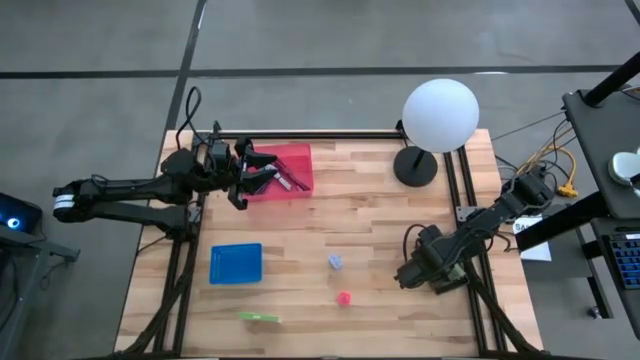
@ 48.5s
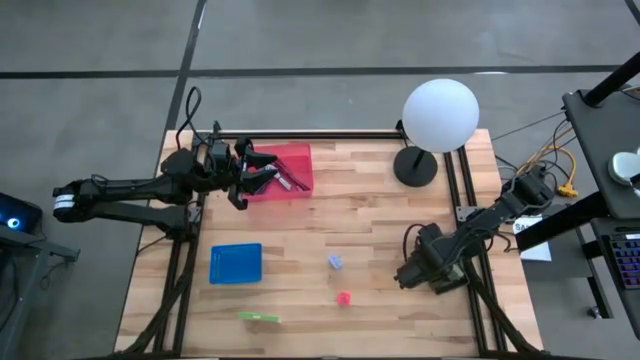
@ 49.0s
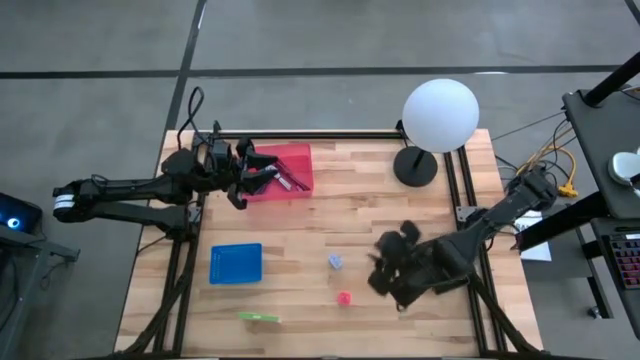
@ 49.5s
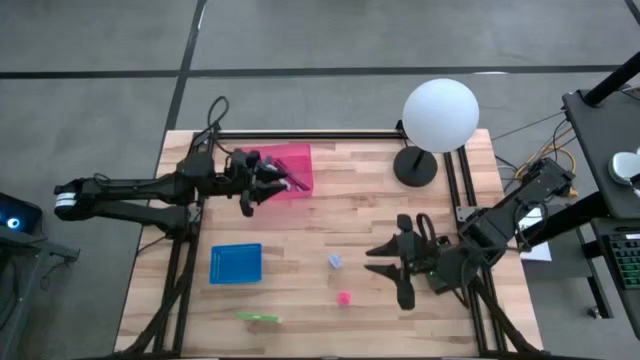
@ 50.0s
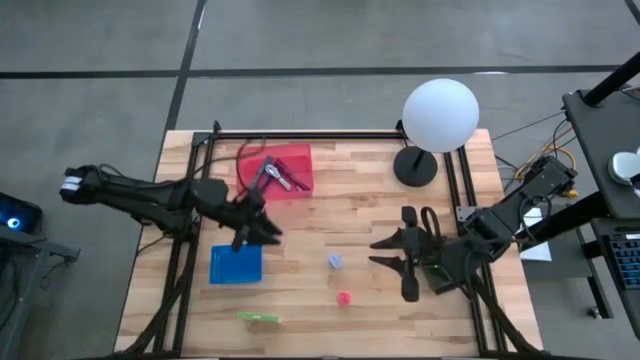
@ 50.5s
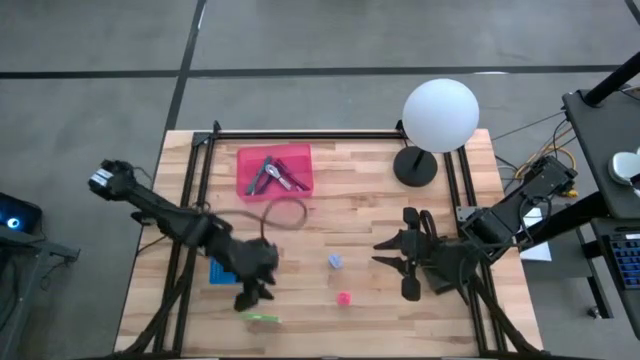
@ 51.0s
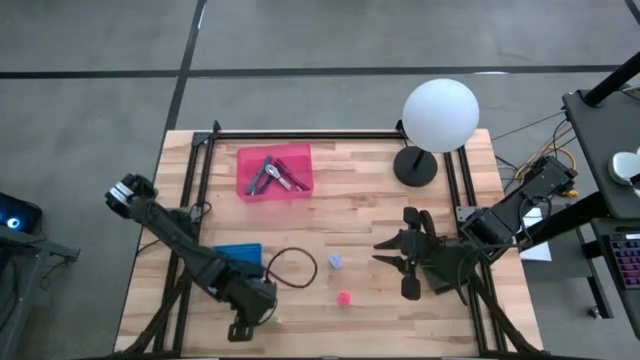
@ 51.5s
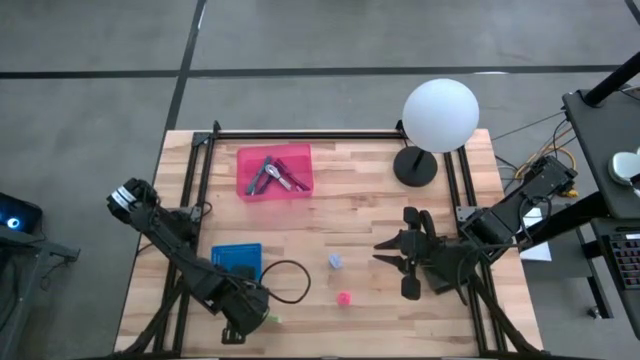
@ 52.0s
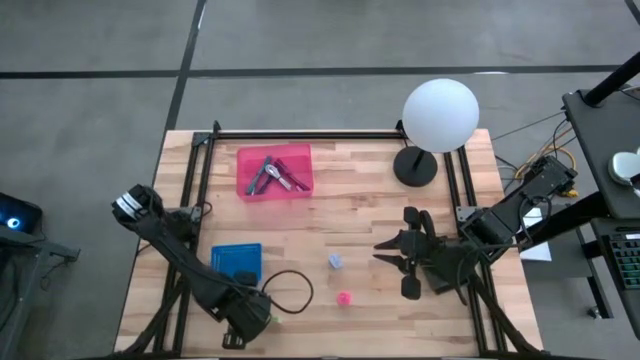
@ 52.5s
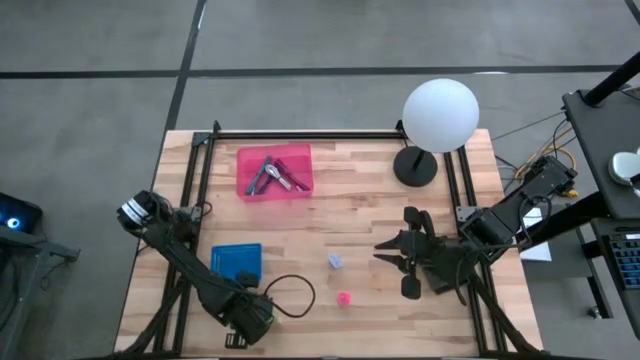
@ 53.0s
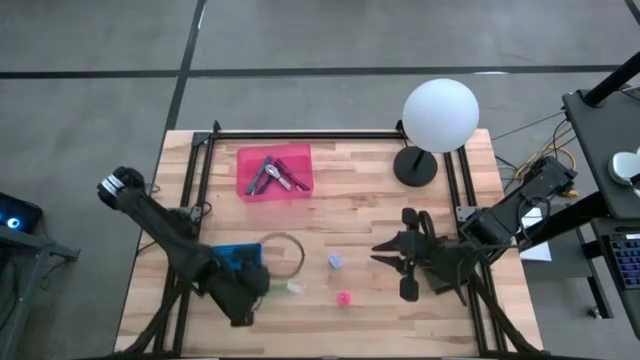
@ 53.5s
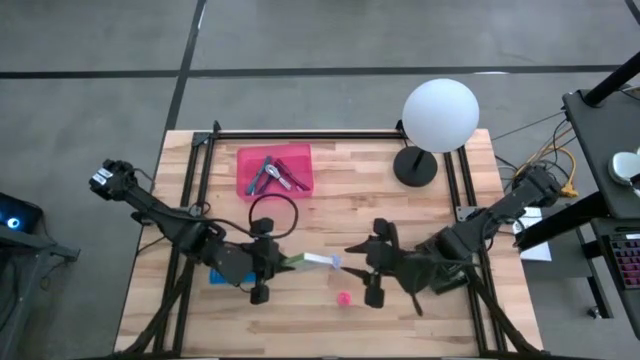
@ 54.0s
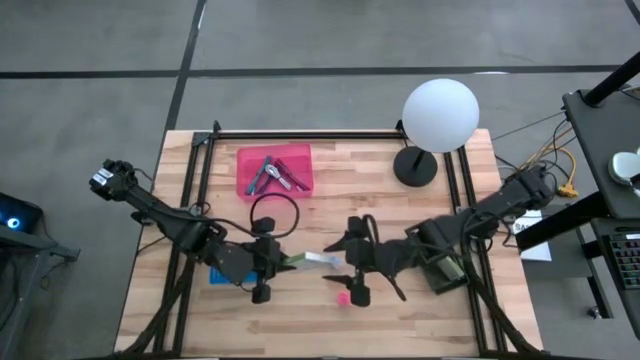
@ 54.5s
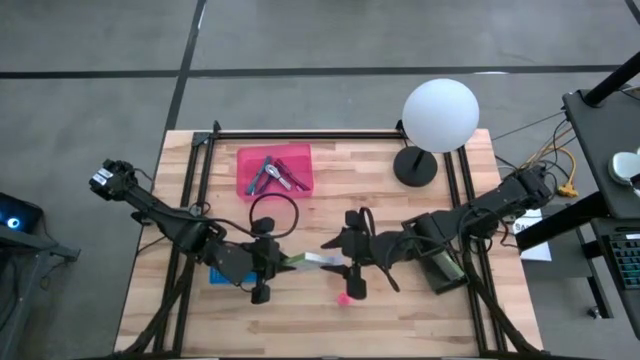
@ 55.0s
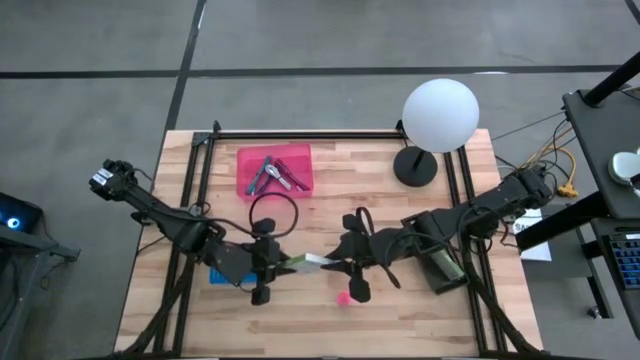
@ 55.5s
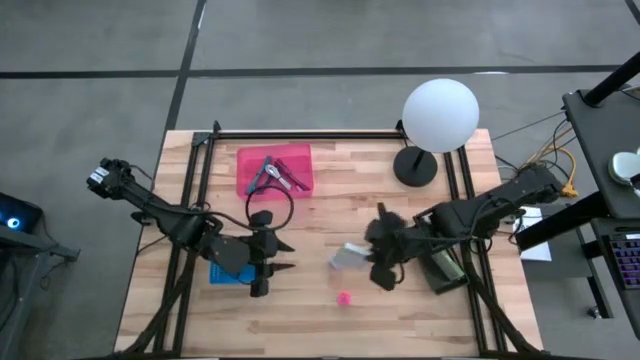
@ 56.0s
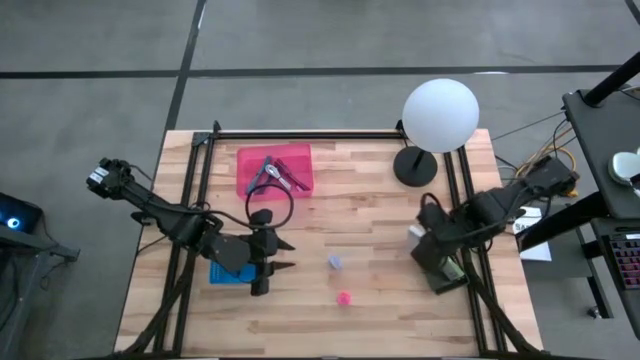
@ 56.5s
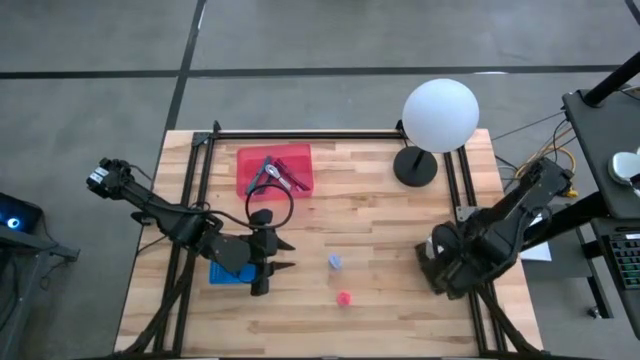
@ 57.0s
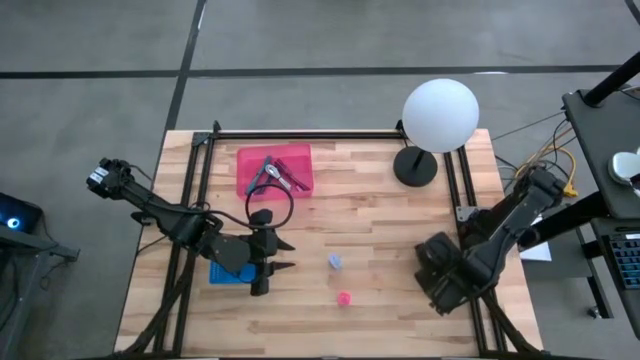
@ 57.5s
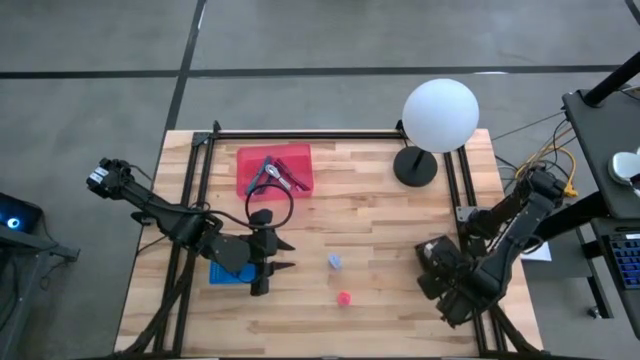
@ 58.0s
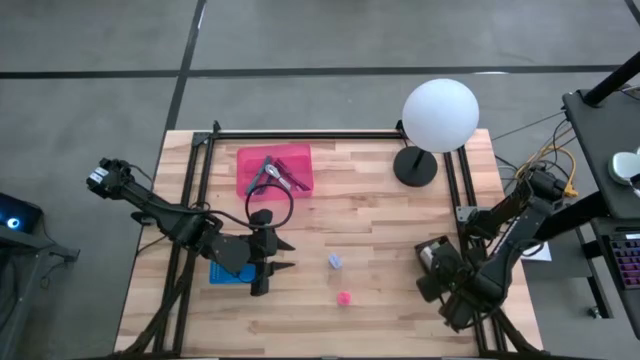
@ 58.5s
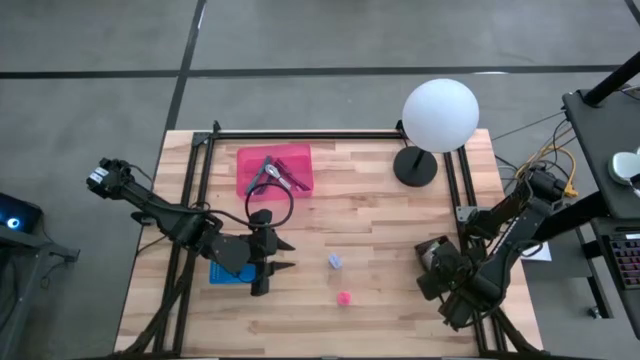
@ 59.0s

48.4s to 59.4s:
Task: Pick and place items into bin
Put the card reader box into the black bin

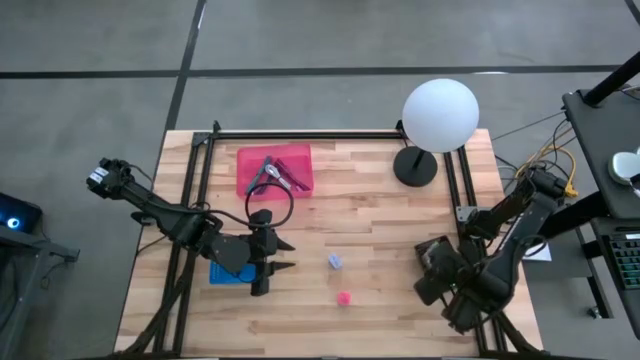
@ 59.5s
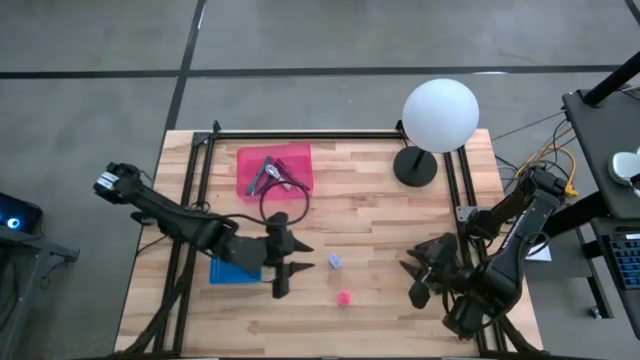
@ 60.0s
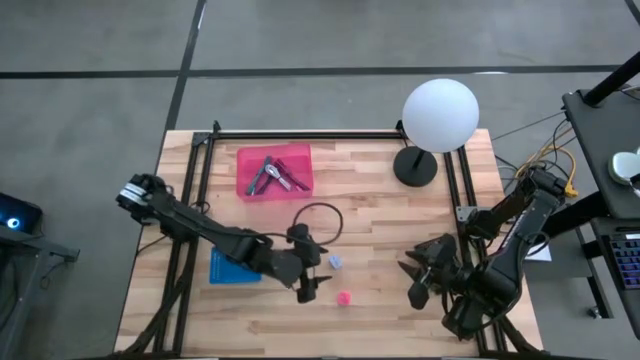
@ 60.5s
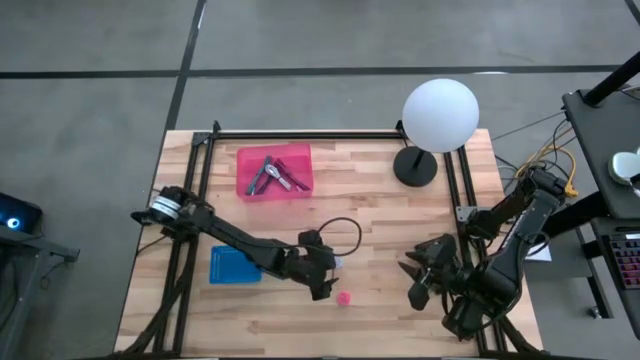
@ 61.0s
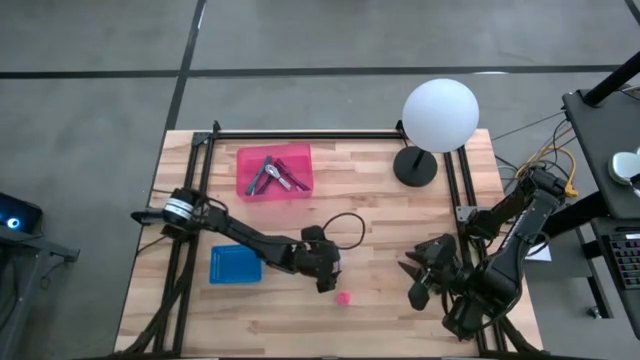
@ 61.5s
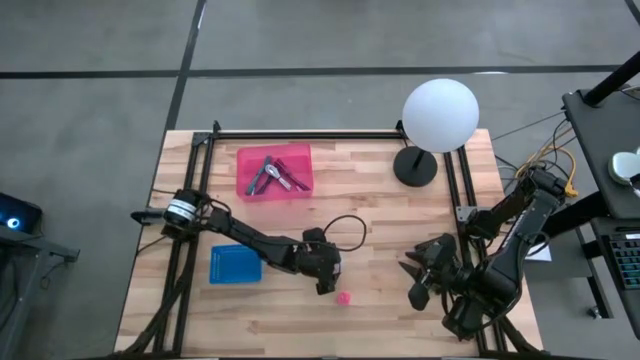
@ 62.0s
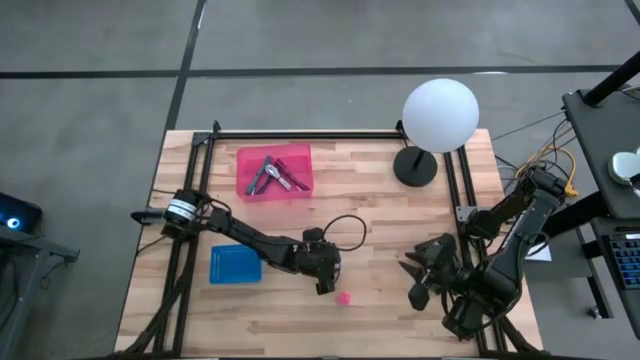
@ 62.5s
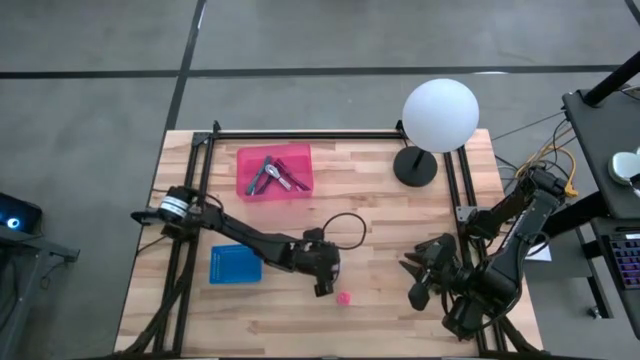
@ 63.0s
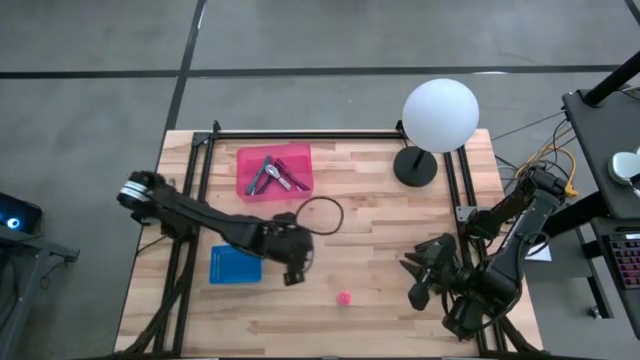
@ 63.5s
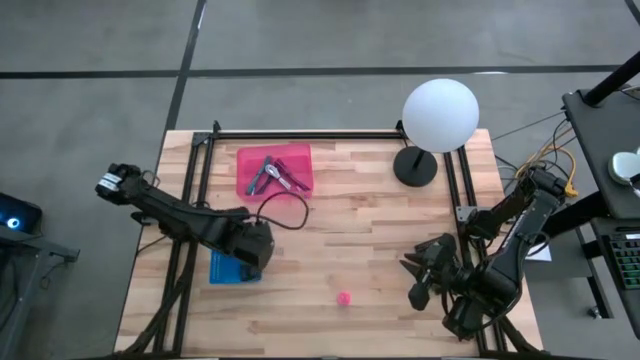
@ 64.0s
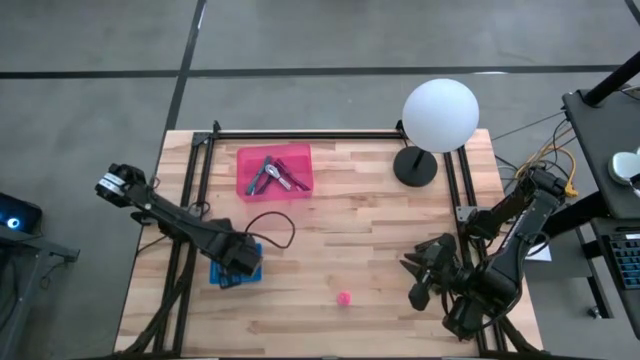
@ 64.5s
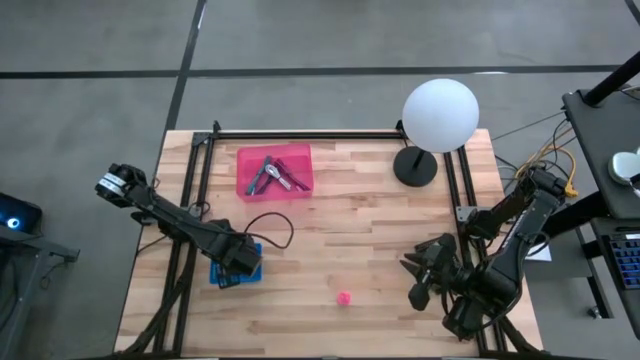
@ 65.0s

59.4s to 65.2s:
Put the white charger adapter into the blue bin

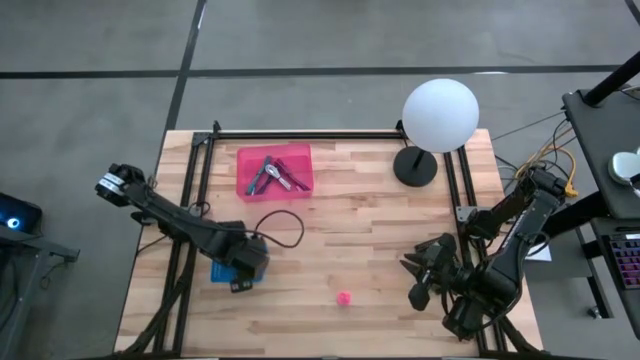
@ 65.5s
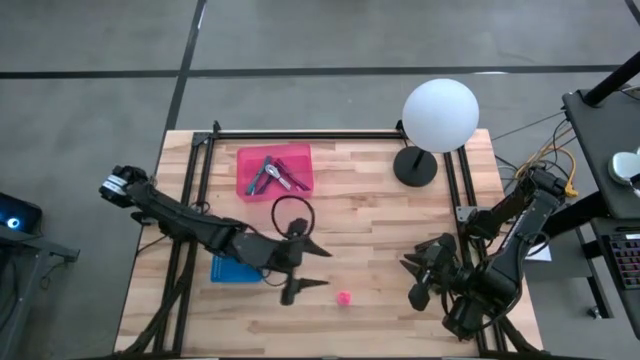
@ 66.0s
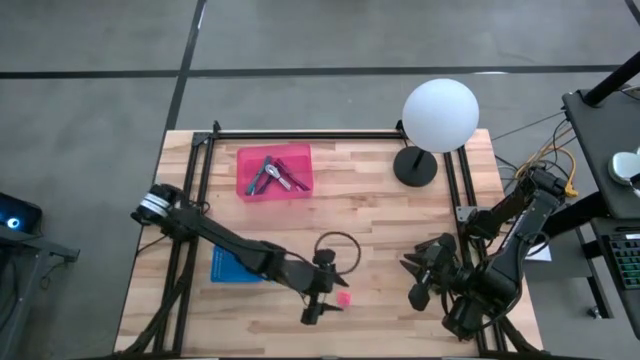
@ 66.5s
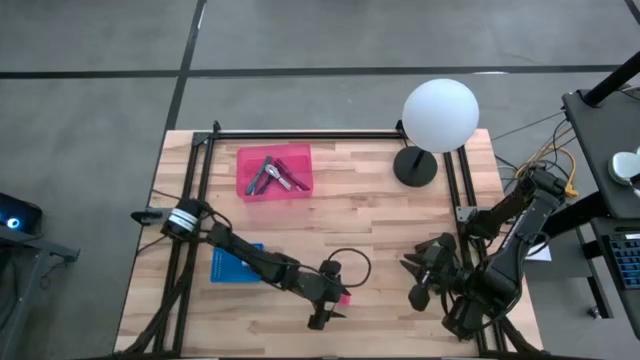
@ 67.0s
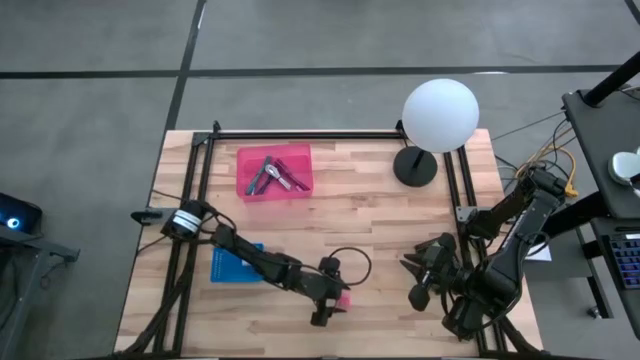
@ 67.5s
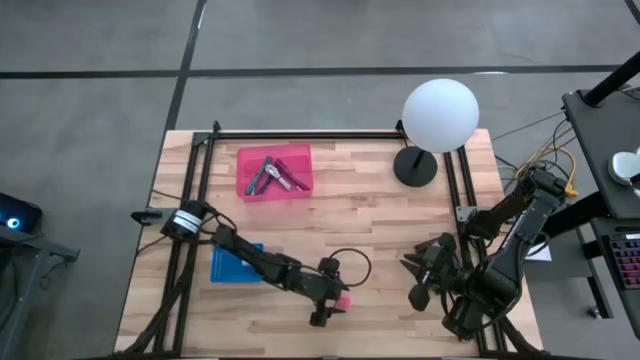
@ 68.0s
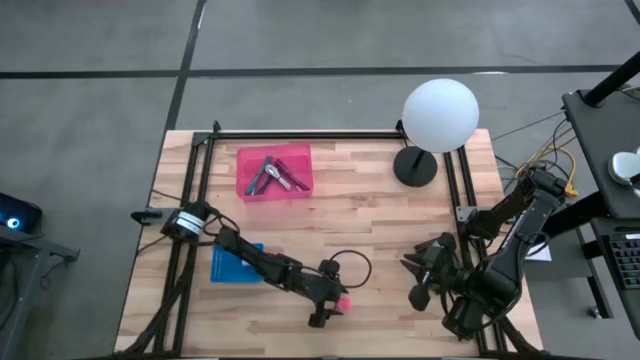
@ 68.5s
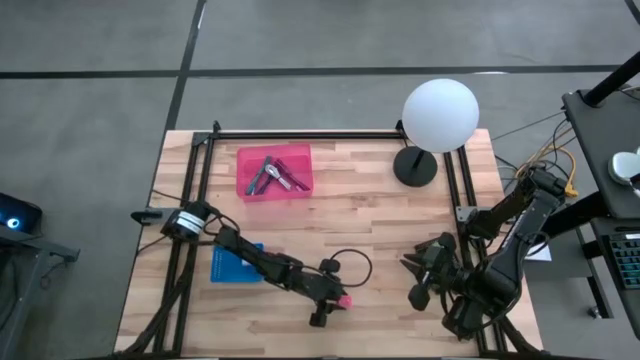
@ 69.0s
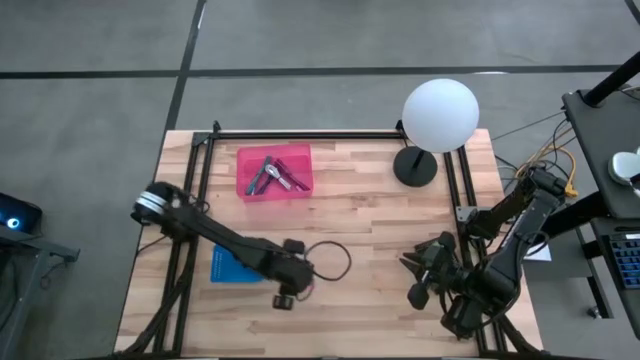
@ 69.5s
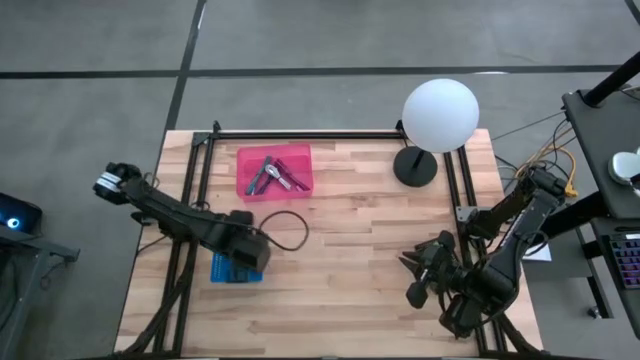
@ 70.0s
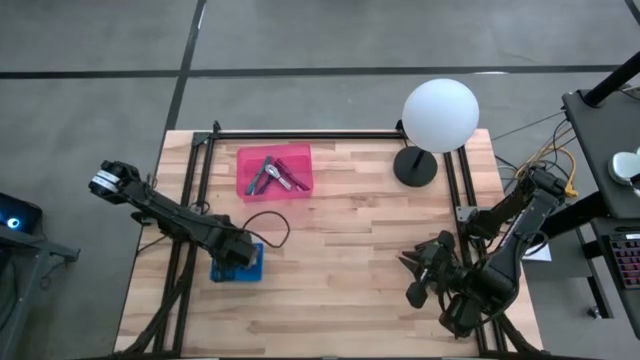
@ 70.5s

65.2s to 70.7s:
Put the pink charger adapter into the blue bin
